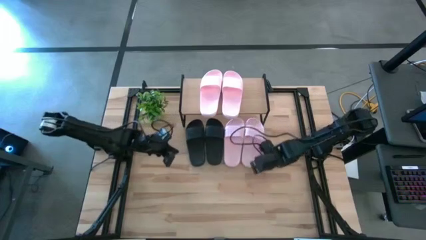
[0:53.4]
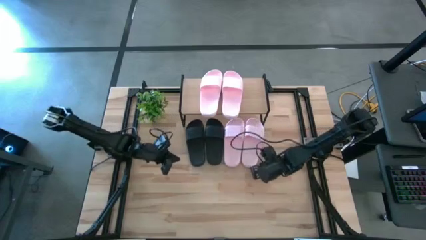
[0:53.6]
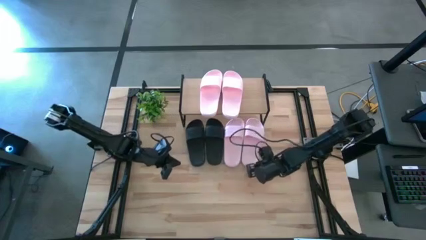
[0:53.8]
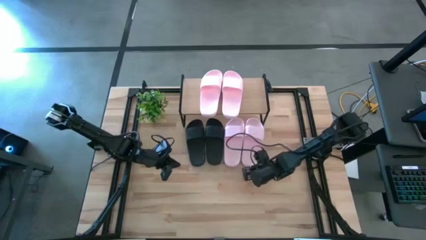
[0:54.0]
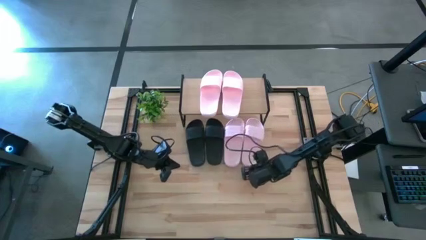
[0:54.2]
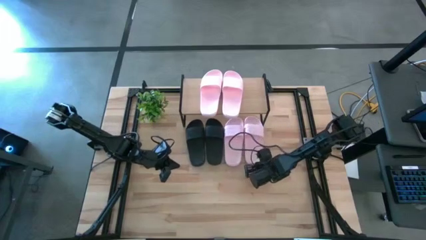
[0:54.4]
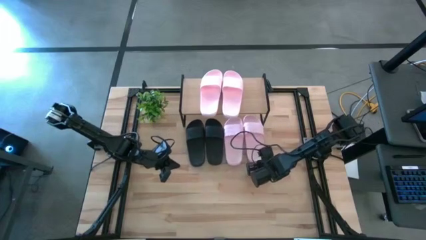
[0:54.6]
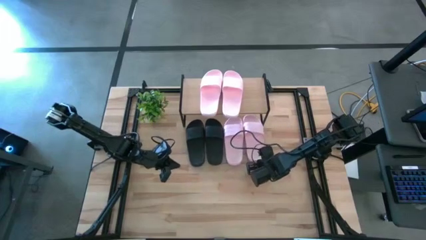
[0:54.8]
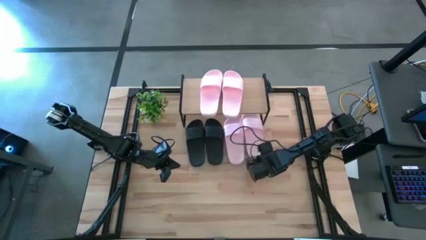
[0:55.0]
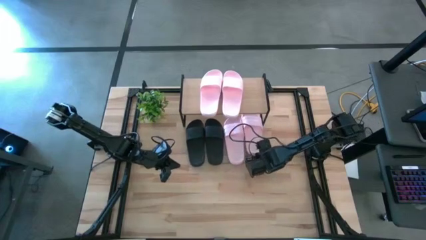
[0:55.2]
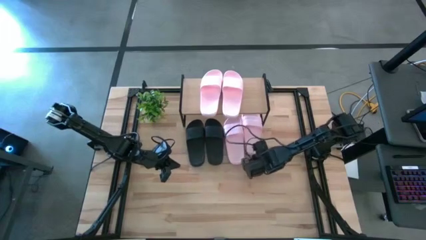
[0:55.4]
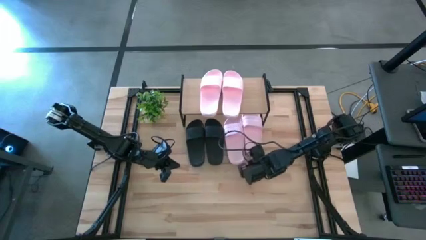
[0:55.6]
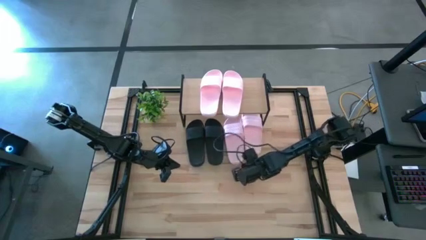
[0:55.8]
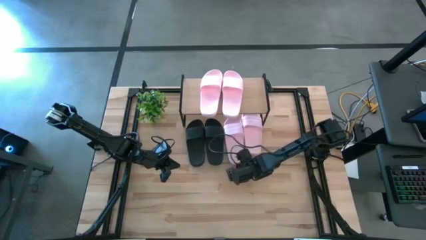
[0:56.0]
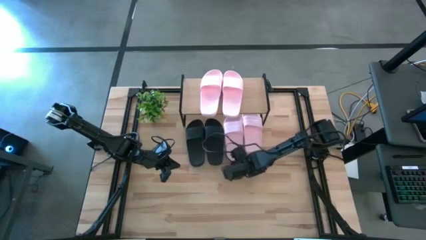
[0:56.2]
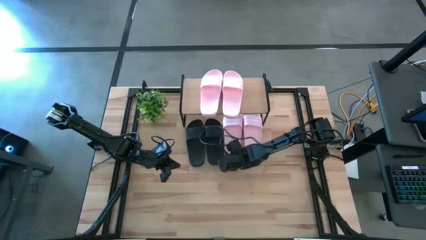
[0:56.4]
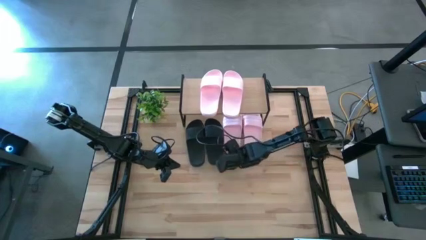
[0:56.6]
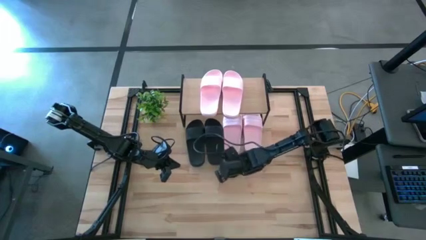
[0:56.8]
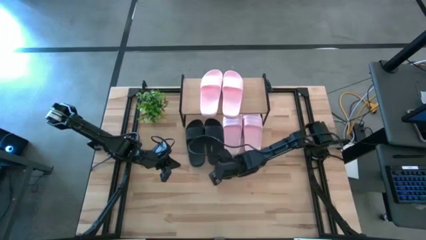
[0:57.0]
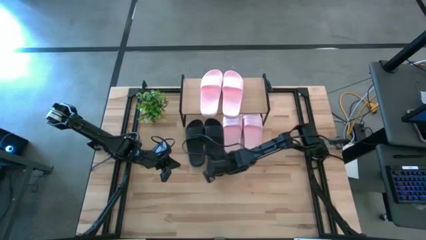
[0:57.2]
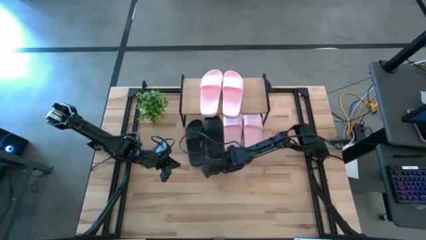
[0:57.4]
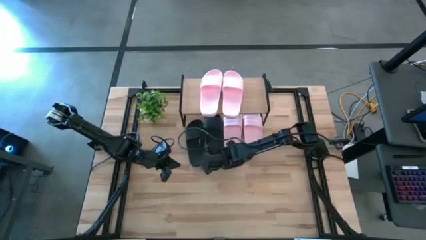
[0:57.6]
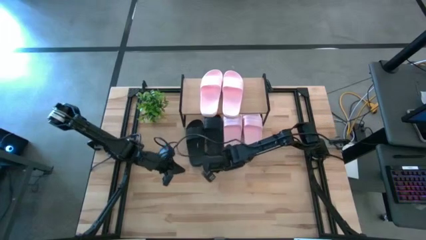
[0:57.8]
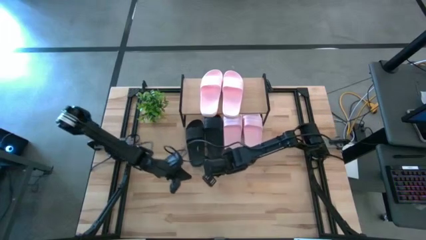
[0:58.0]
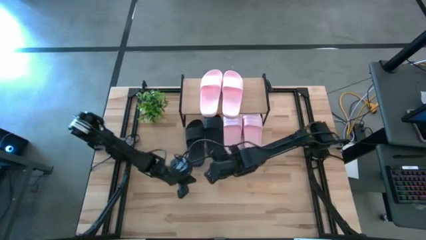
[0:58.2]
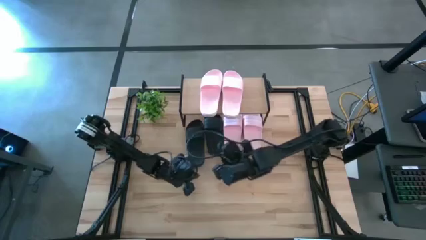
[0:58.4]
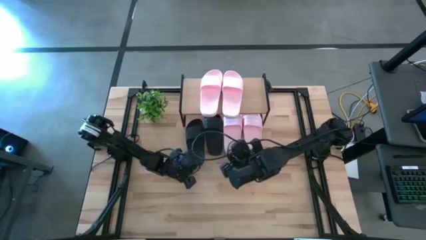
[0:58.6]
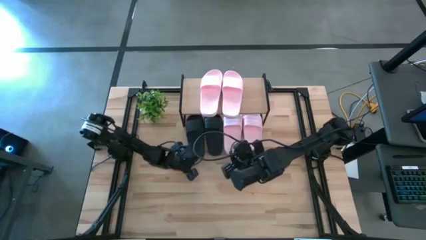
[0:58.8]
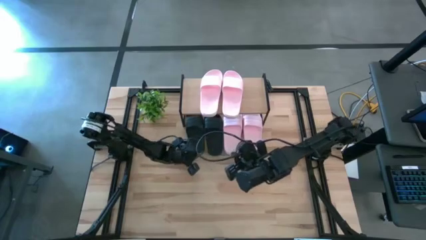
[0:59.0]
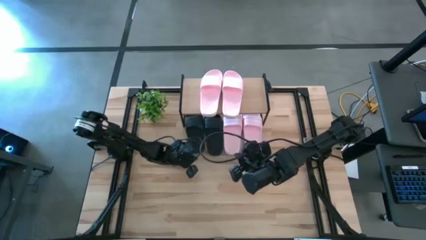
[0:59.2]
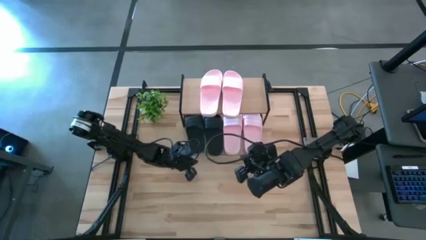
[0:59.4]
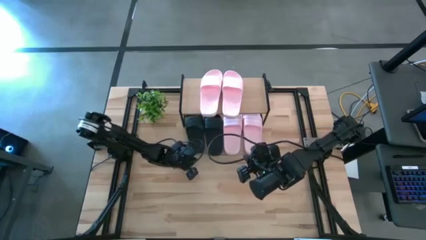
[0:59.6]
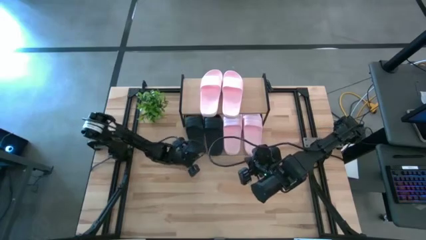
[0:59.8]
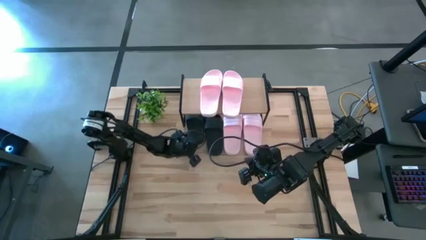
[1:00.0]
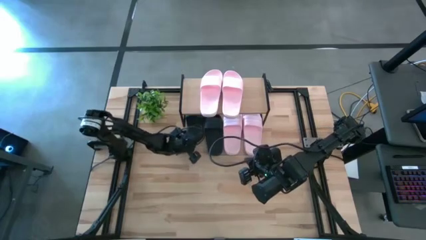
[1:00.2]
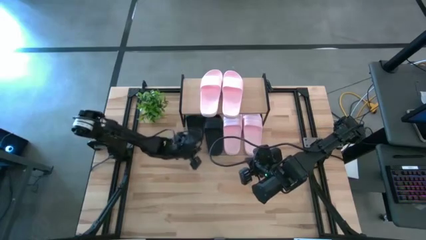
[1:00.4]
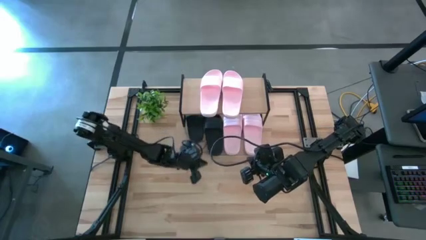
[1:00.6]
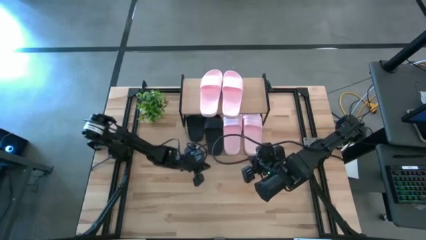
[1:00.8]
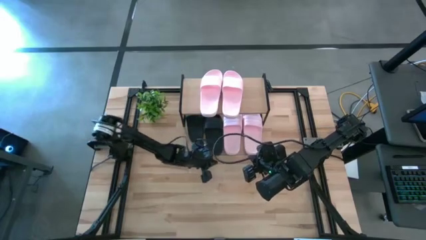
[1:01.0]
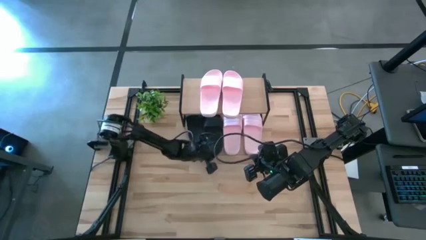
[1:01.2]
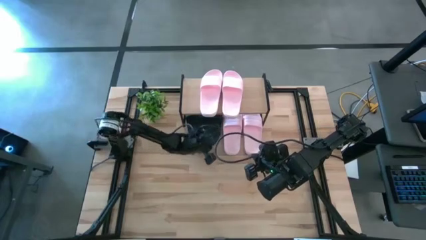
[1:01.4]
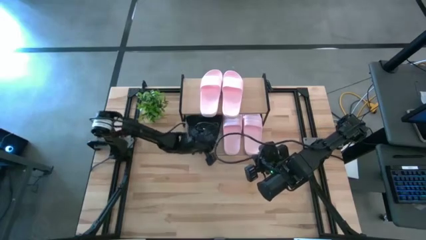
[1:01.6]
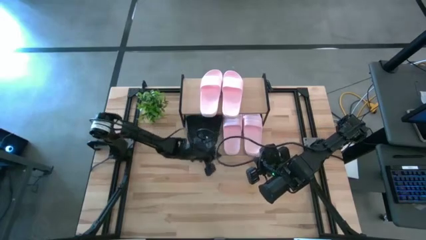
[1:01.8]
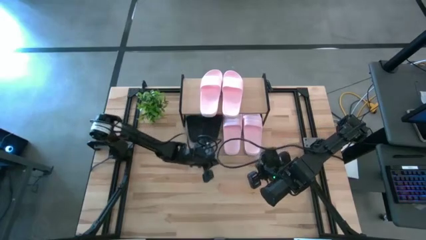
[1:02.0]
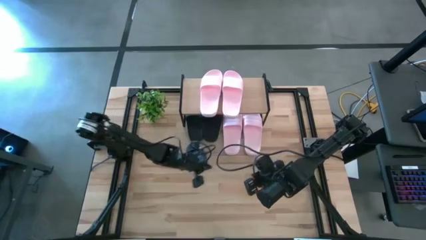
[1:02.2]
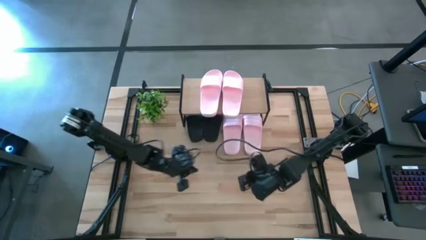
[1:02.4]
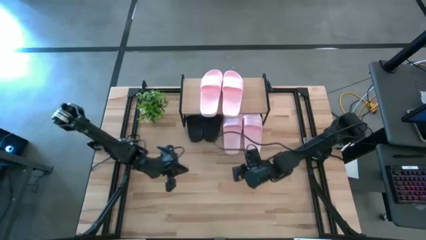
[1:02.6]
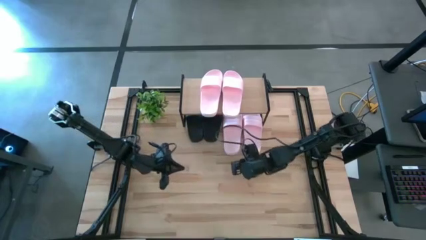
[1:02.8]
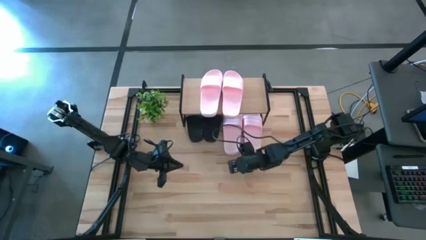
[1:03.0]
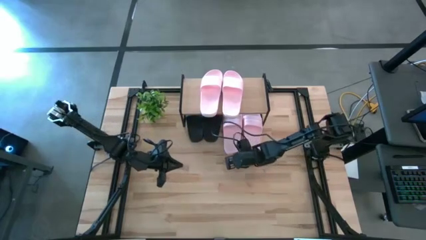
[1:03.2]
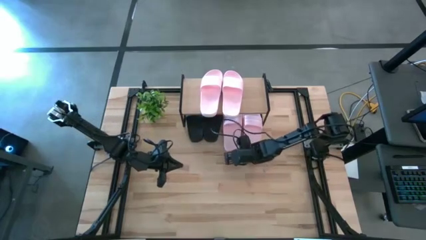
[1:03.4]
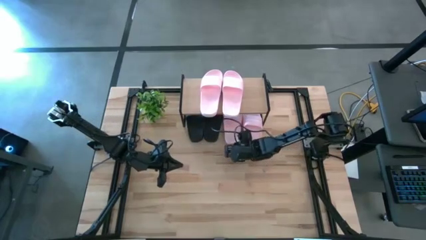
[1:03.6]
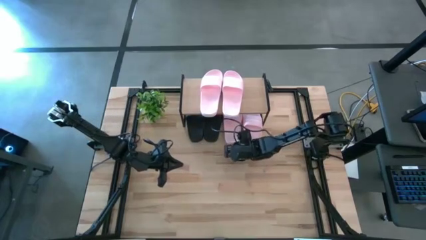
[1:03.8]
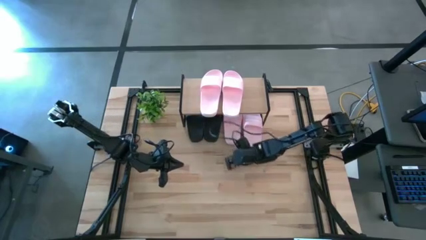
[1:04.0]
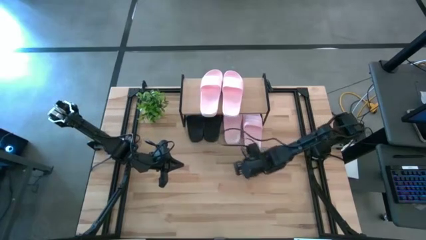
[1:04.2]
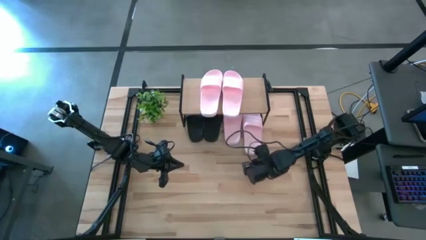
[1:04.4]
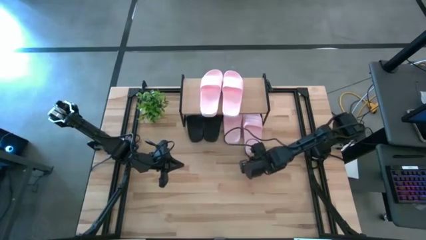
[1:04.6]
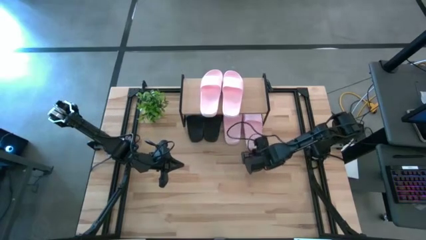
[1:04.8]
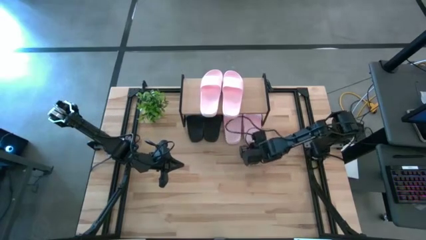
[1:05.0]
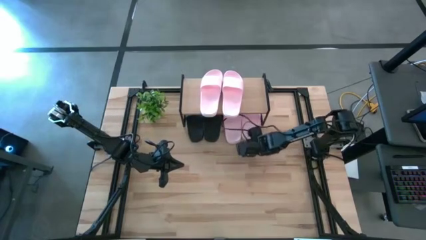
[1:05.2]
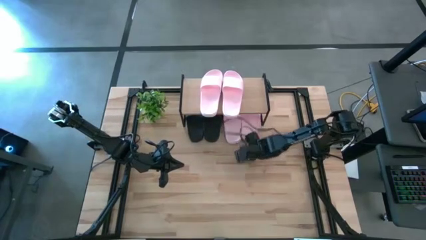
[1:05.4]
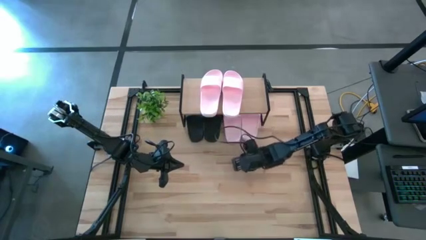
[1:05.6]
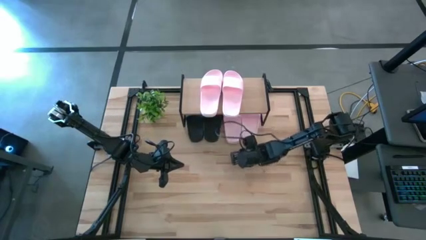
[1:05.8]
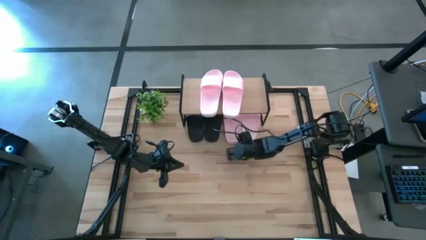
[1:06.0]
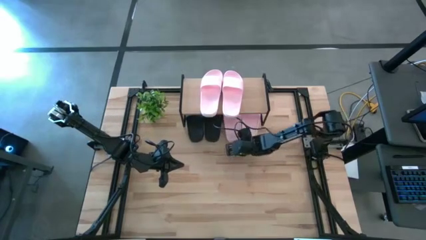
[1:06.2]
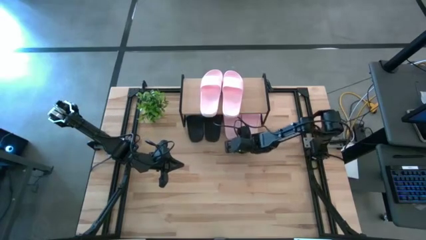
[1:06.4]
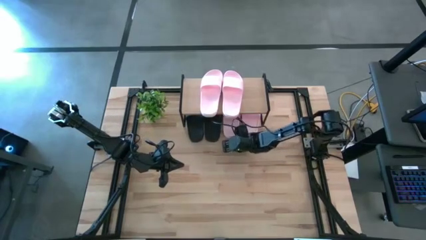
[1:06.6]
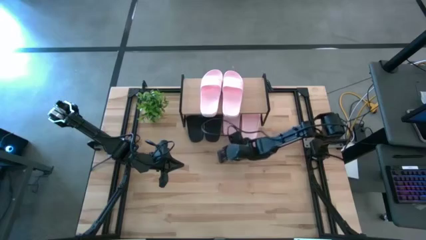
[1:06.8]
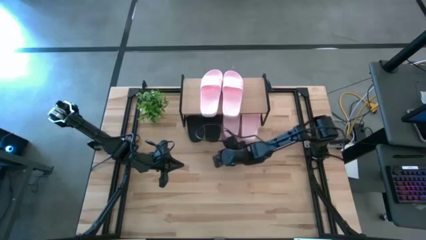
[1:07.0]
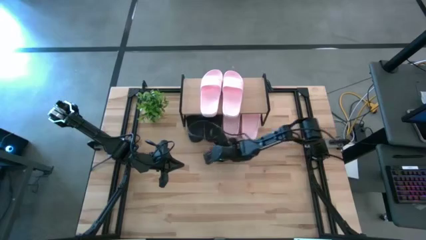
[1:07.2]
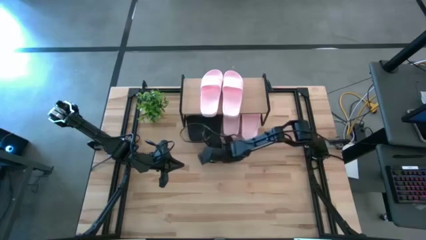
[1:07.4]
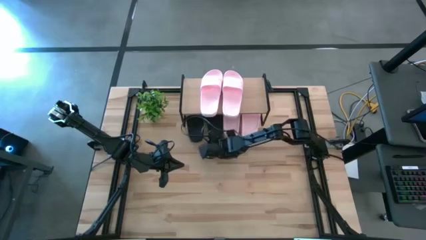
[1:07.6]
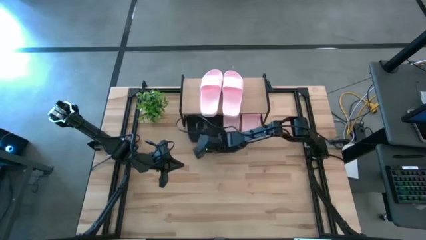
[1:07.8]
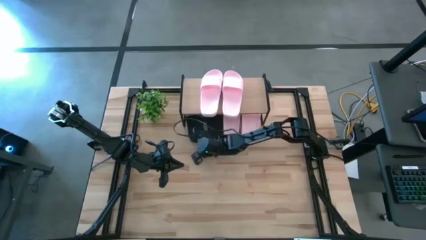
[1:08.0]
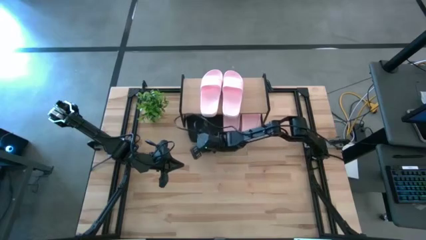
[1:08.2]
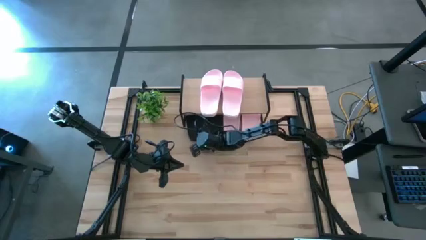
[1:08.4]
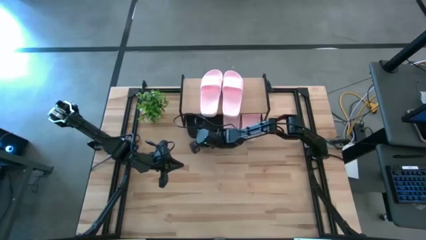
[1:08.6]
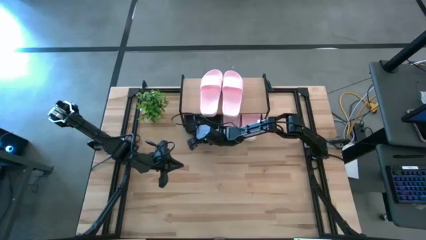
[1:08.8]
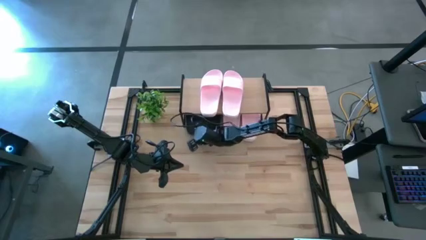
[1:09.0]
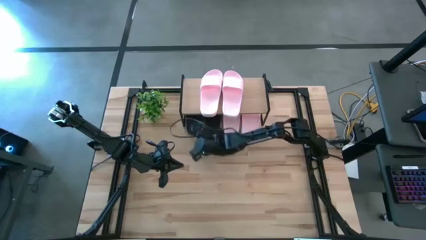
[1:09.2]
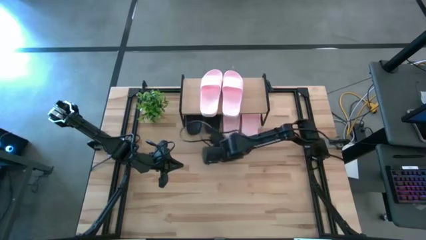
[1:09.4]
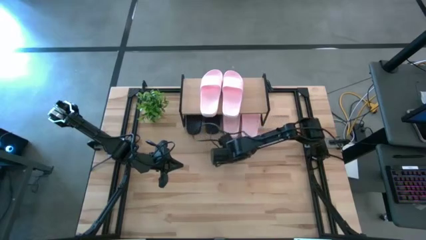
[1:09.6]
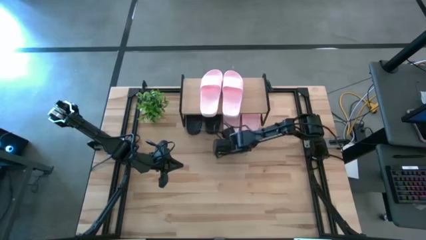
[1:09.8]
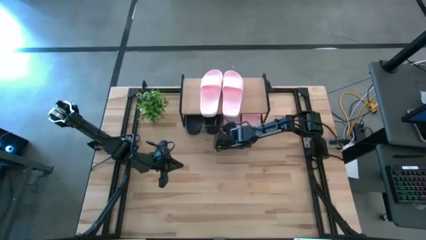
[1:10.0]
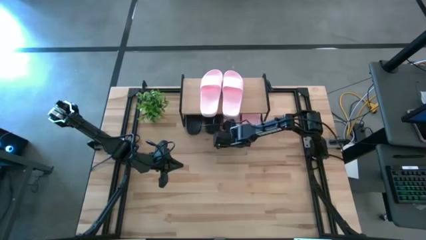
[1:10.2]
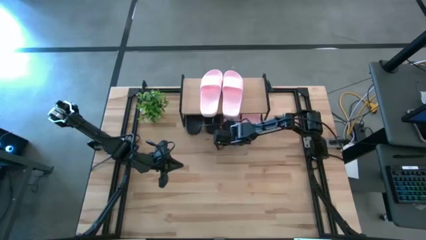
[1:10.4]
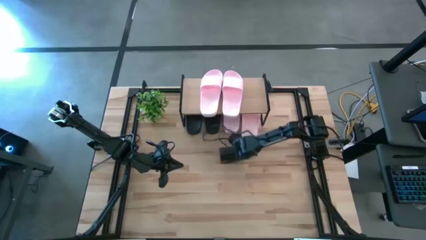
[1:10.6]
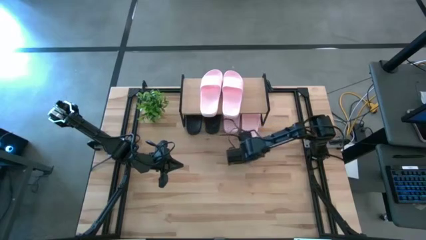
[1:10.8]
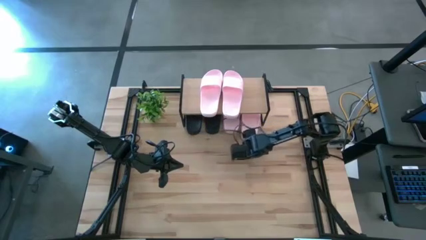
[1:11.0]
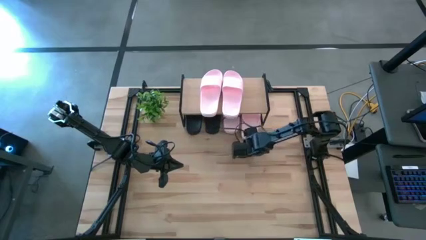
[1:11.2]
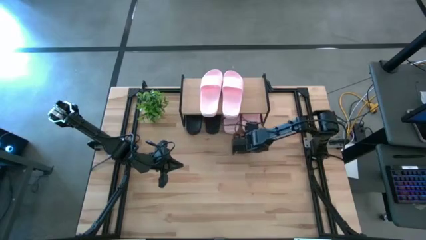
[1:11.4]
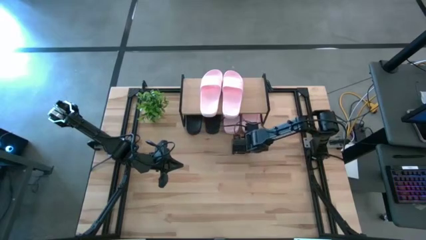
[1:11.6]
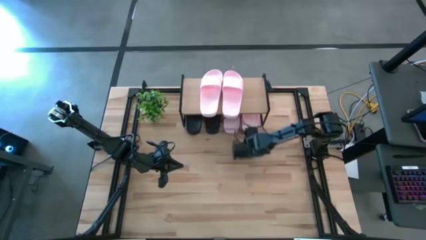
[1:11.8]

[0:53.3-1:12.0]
Task: Pick and place slides into the shelf
Move the pair of slides from the middle of the table to under the shelf
